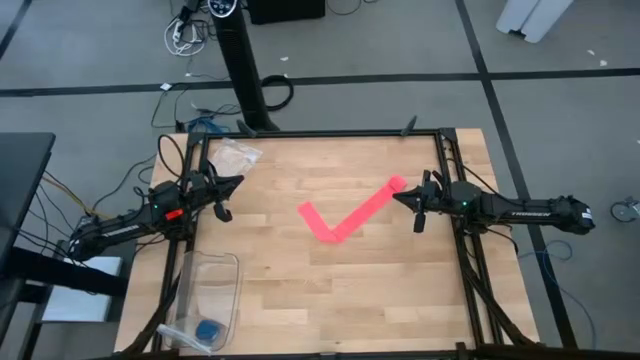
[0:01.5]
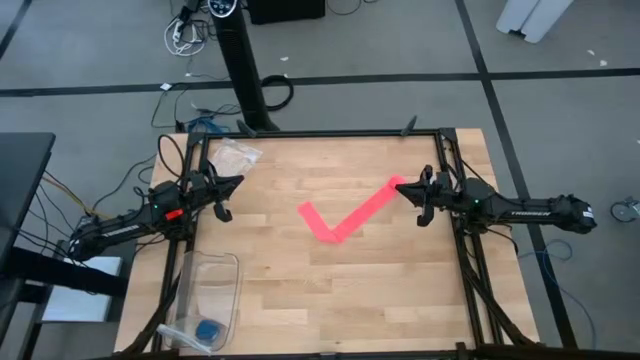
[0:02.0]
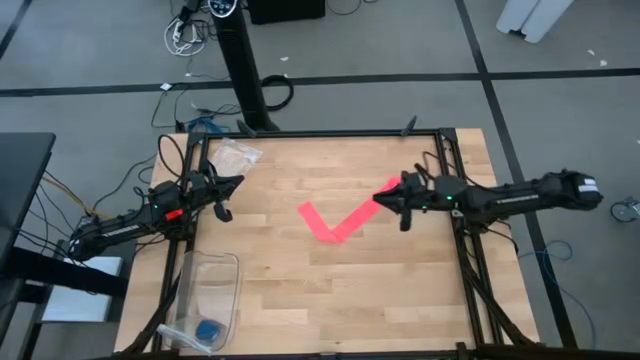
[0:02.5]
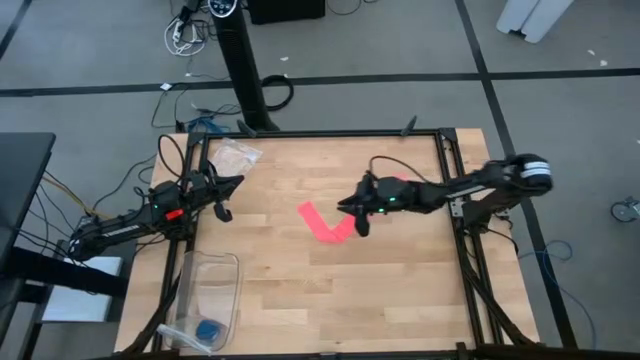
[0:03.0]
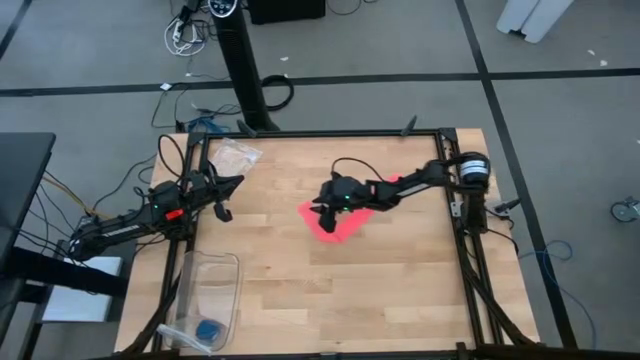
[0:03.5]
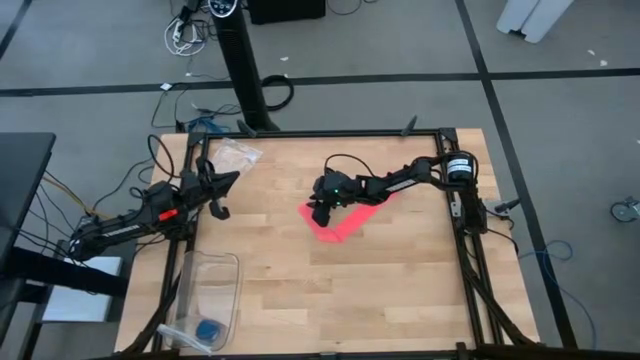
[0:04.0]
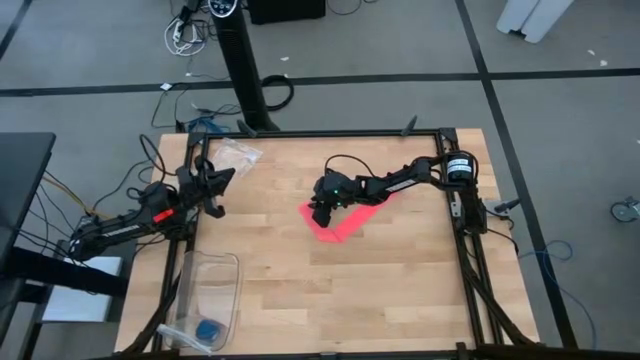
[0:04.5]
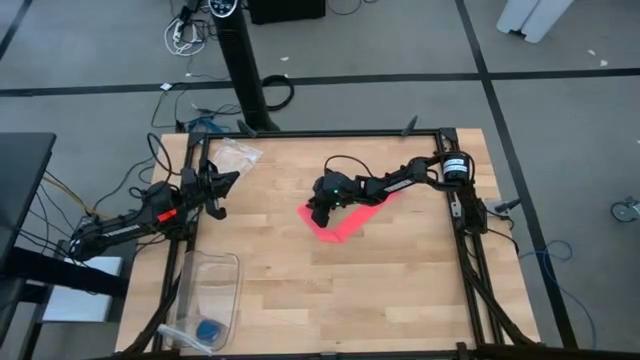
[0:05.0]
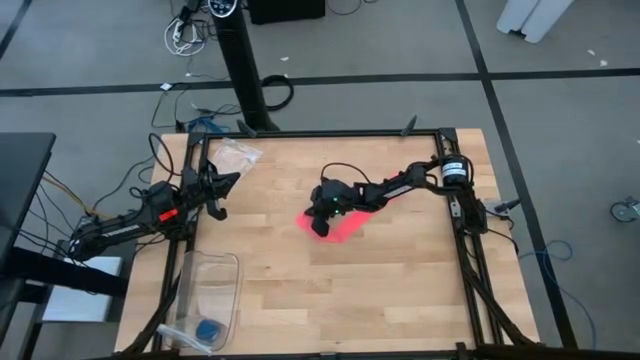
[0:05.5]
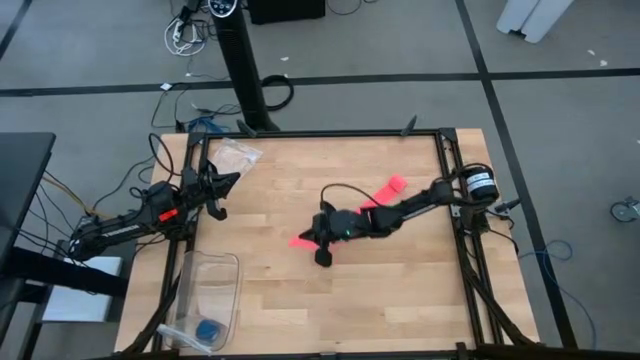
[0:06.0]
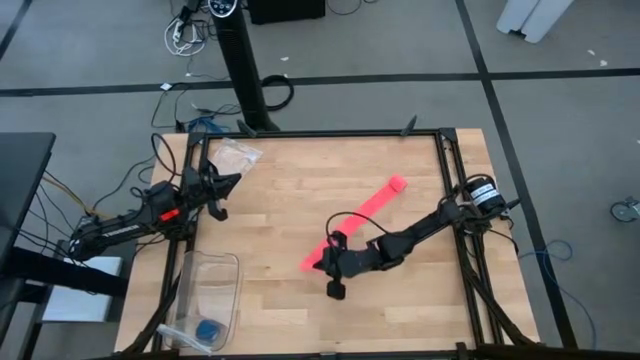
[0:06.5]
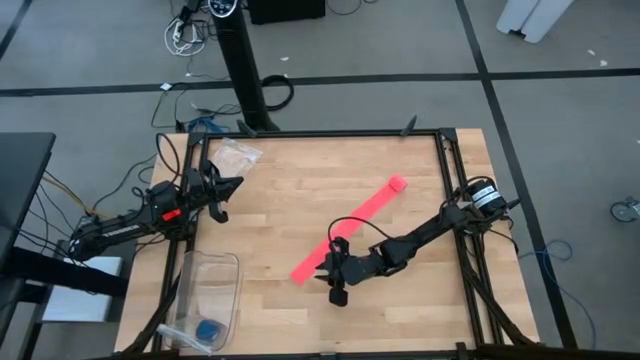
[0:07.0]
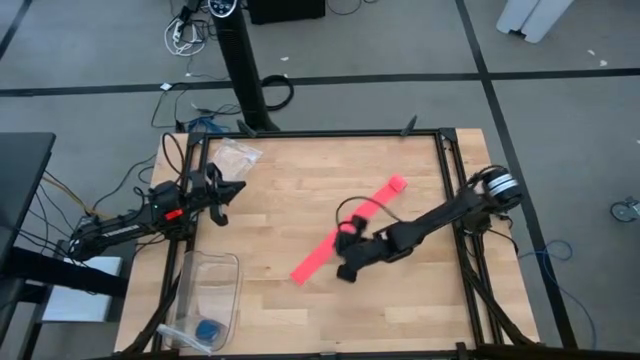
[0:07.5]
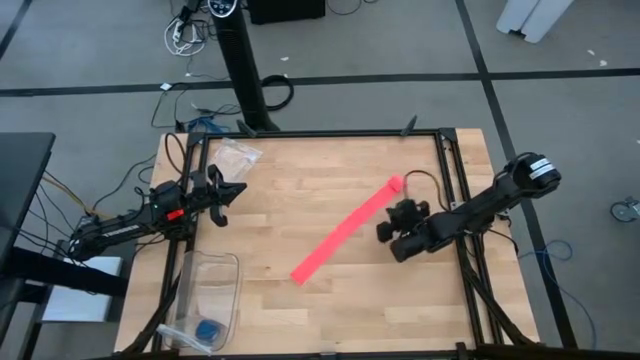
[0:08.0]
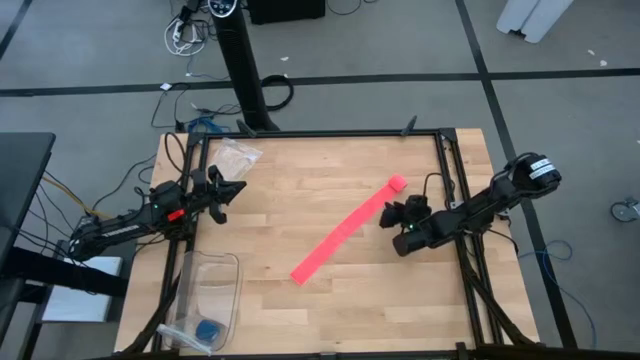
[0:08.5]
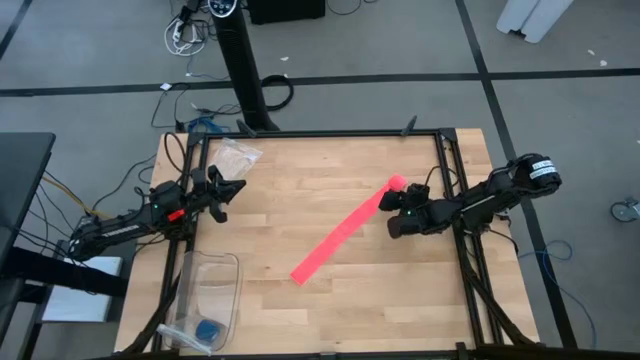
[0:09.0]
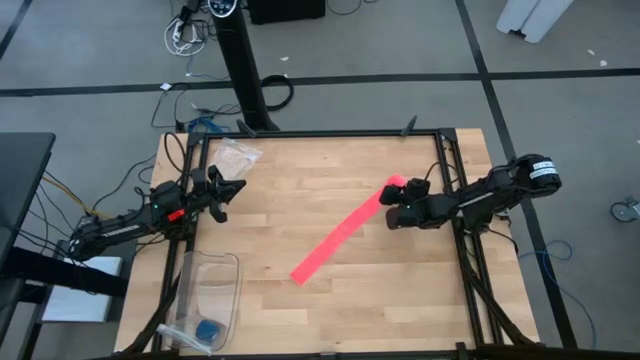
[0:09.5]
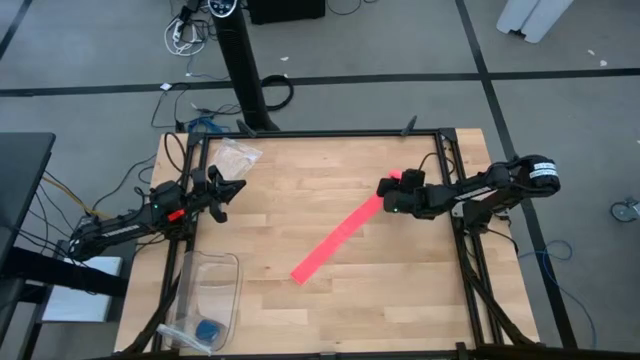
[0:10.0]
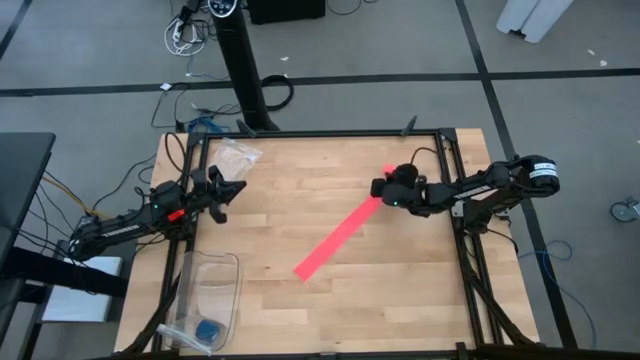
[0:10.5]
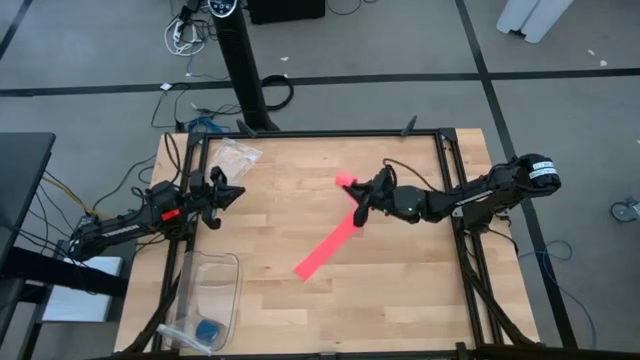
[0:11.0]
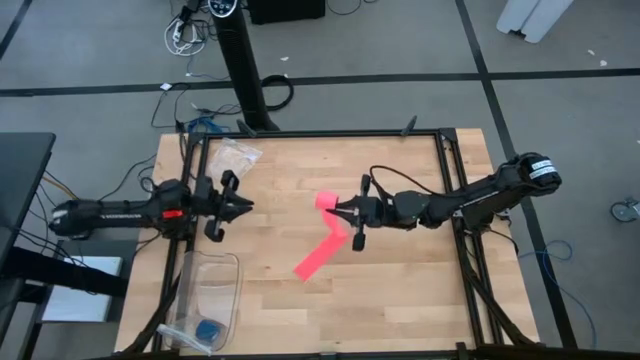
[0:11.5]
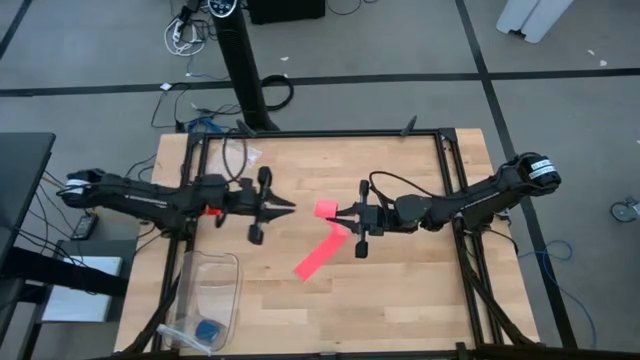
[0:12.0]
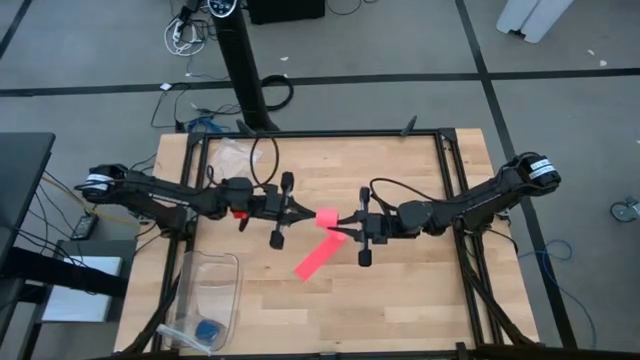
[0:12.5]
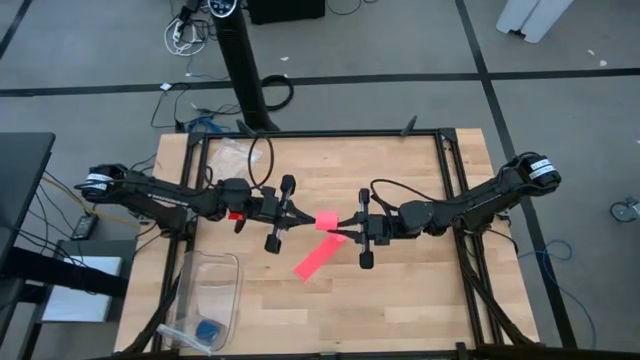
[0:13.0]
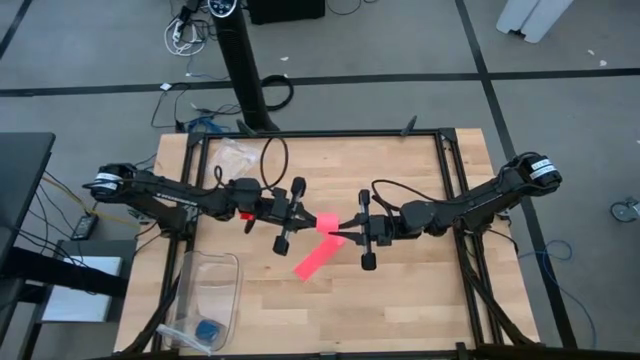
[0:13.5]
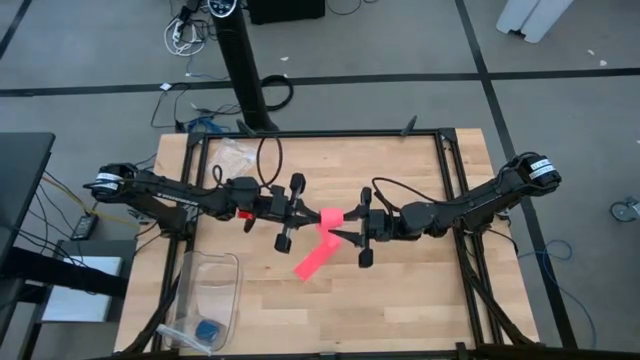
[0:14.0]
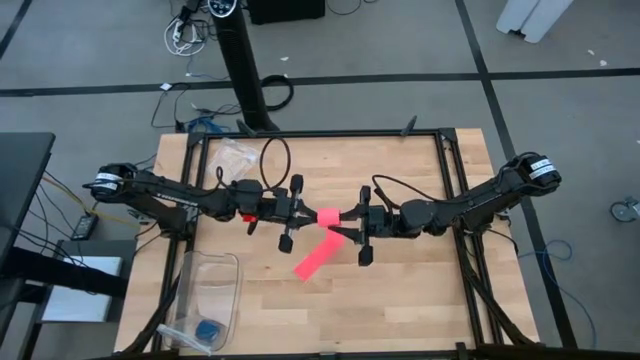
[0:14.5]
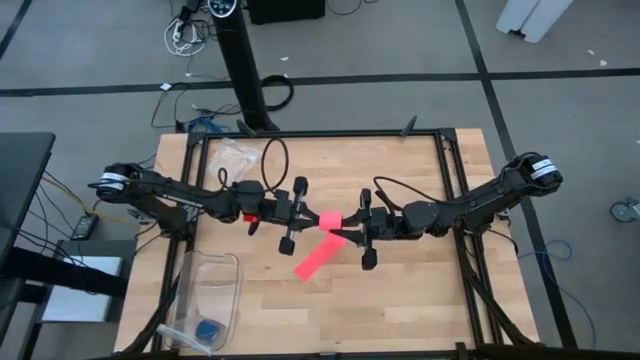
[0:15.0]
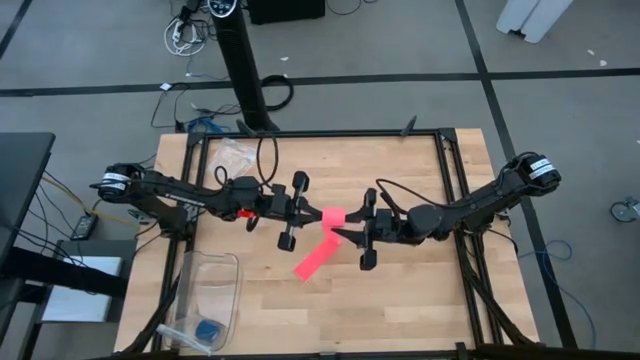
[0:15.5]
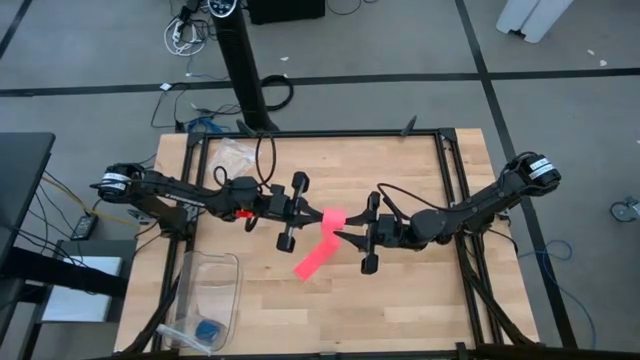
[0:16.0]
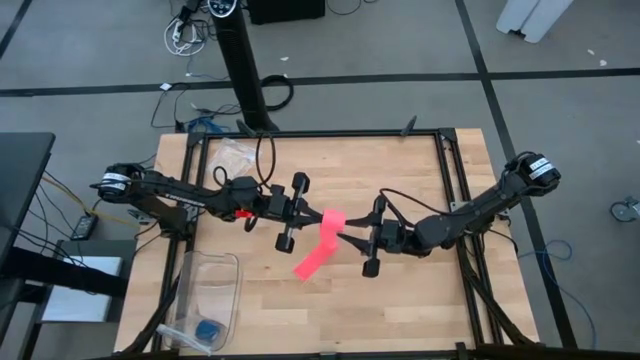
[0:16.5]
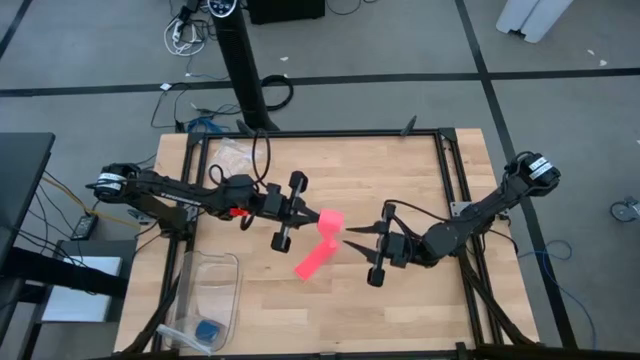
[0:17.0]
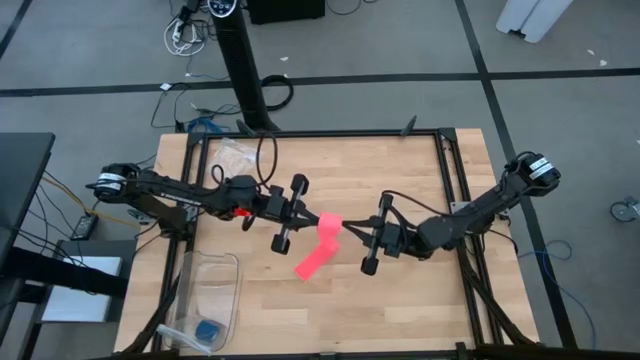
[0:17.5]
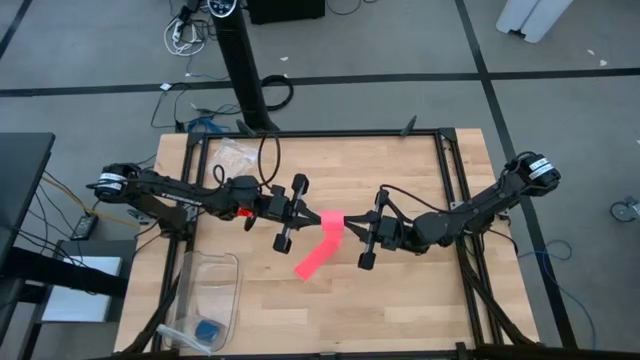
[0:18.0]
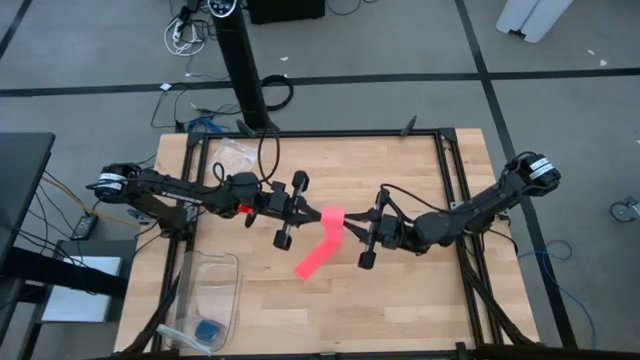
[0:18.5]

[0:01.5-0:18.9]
Task: Roll bandage
Roll the pink bandage

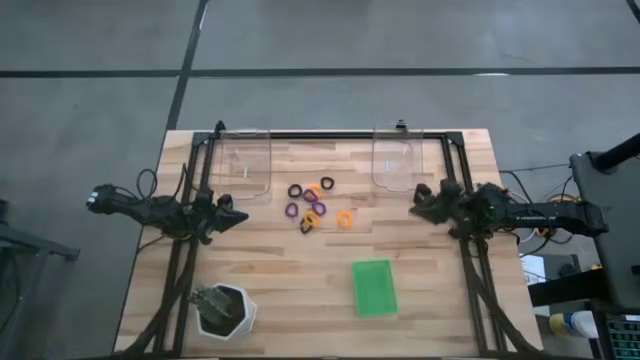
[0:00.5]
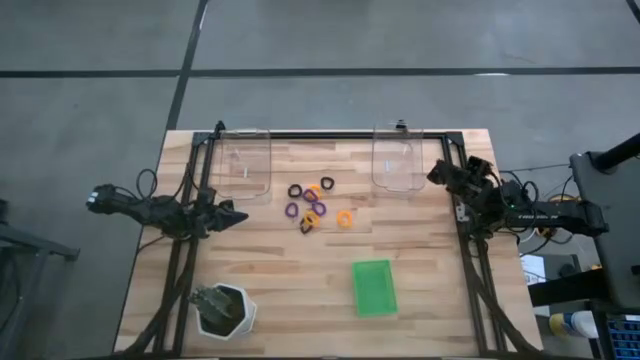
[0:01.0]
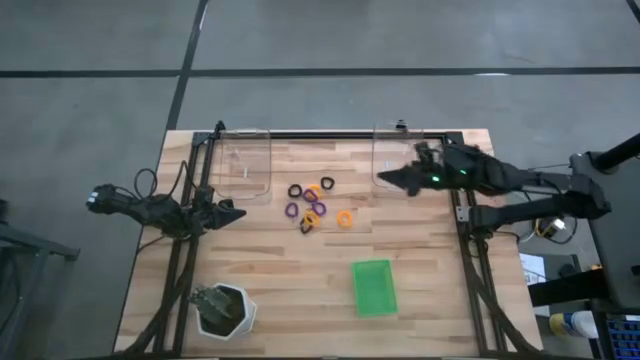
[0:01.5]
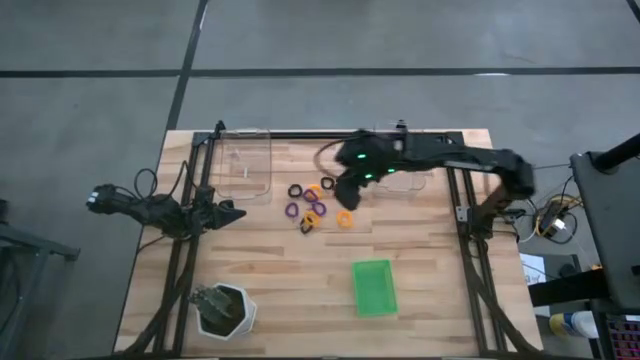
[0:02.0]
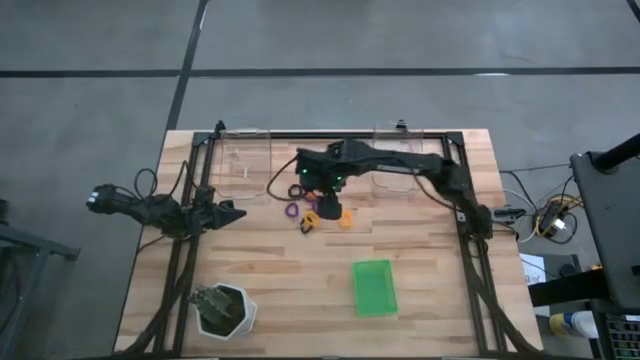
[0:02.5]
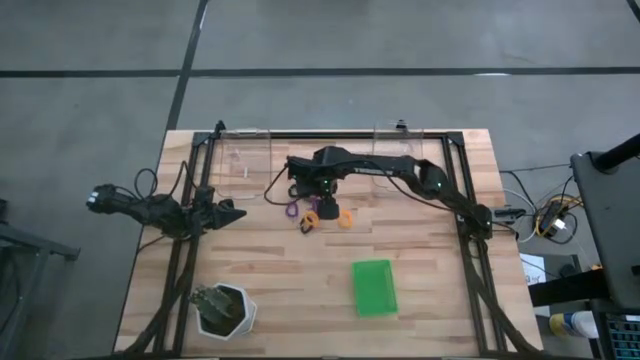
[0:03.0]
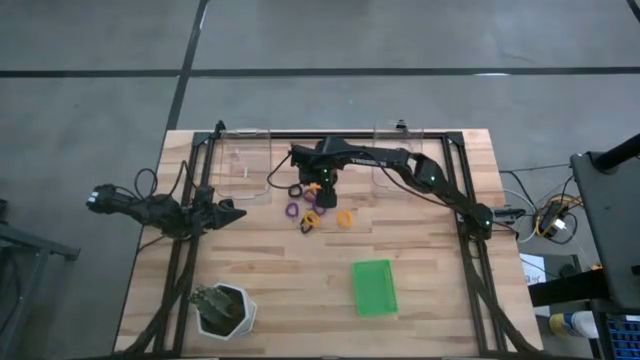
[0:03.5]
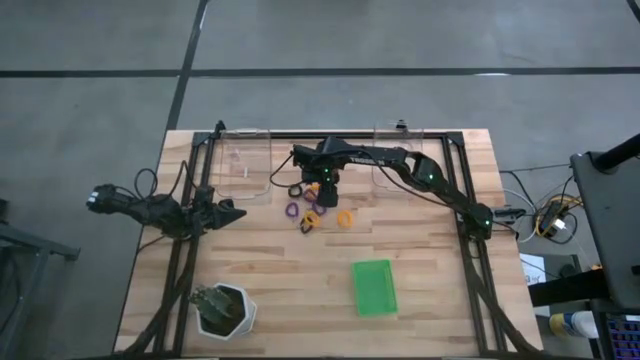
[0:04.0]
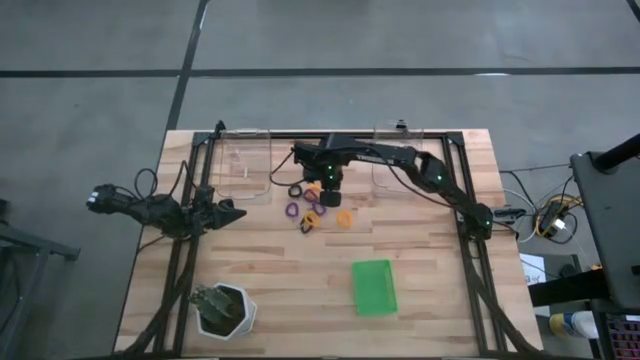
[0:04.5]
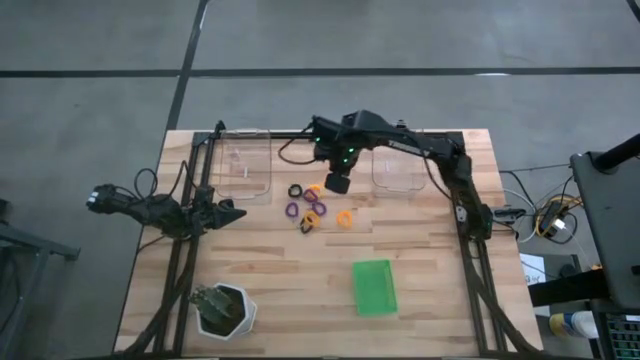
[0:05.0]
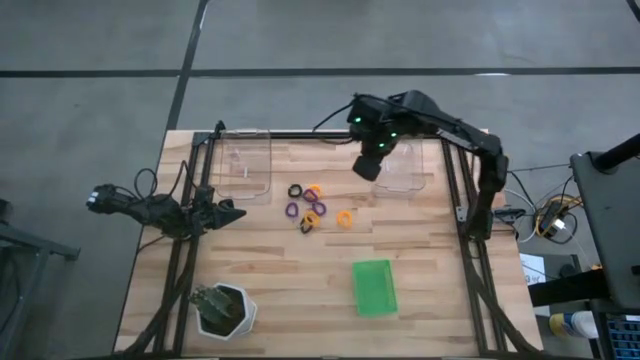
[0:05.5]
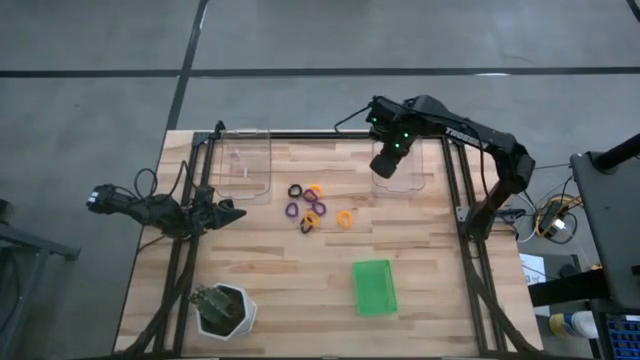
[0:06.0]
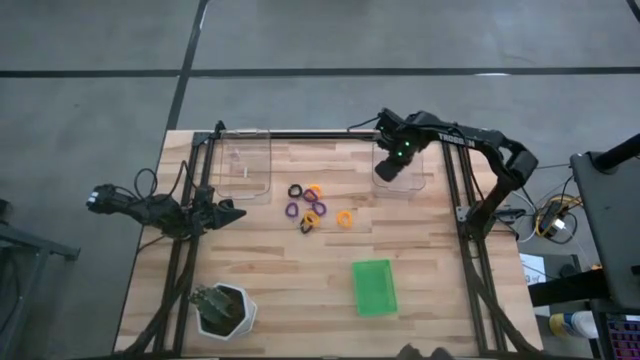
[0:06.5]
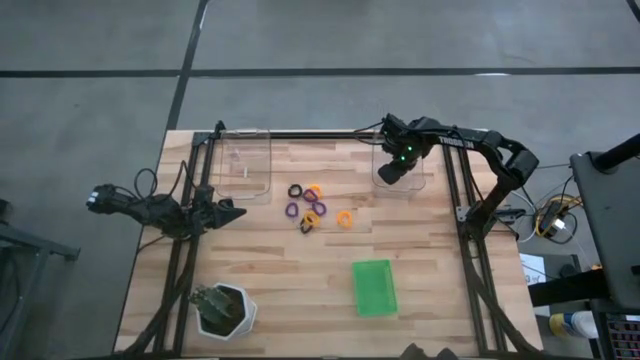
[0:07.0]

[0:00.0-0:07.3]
Task: Sort spring keychains
Put the top right black spring keychain into the right transparent bin
